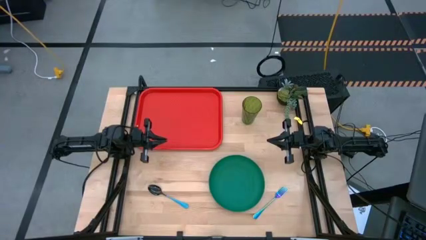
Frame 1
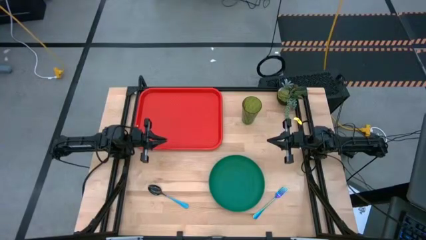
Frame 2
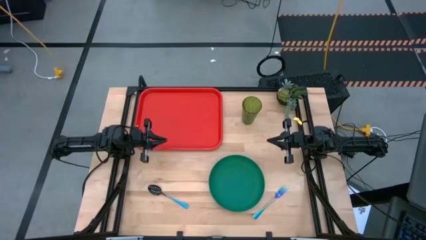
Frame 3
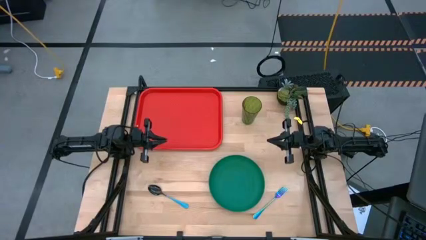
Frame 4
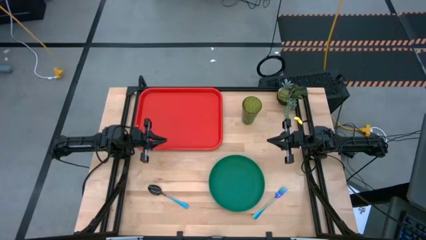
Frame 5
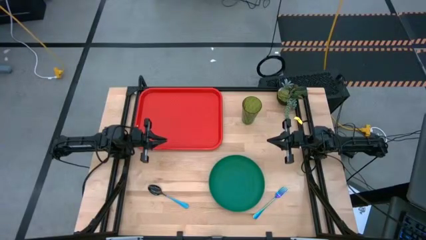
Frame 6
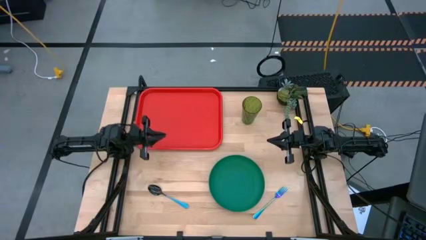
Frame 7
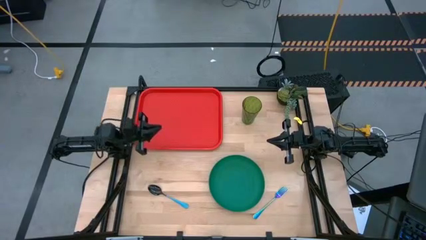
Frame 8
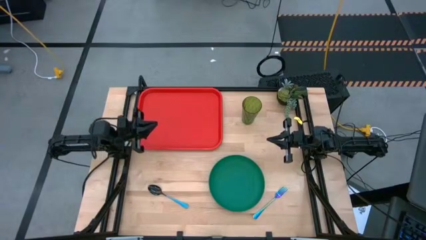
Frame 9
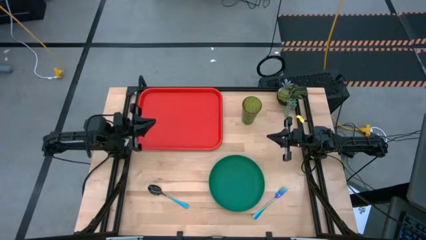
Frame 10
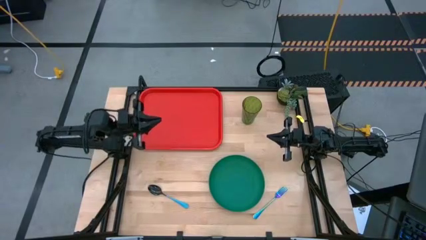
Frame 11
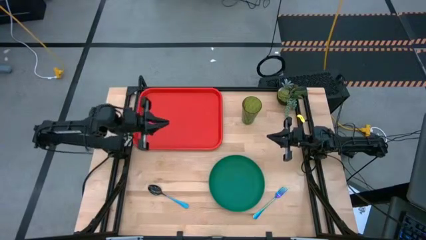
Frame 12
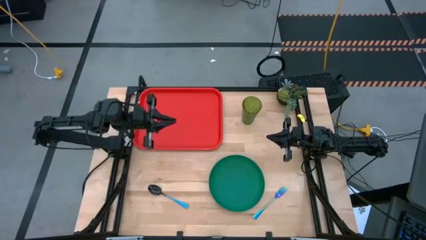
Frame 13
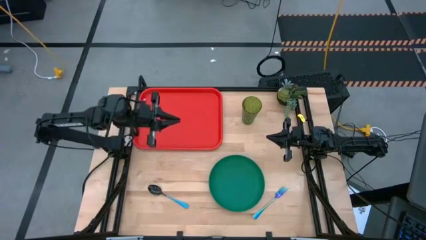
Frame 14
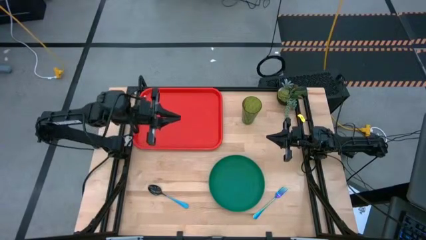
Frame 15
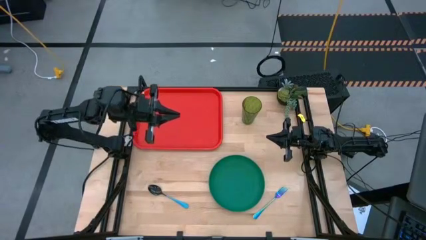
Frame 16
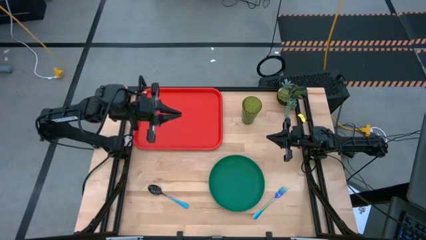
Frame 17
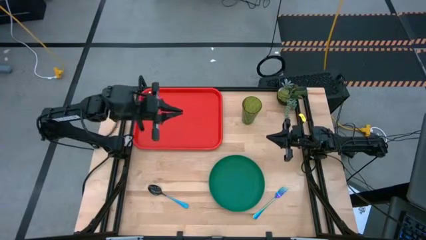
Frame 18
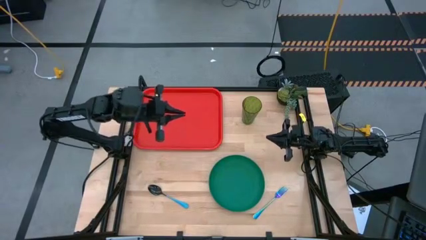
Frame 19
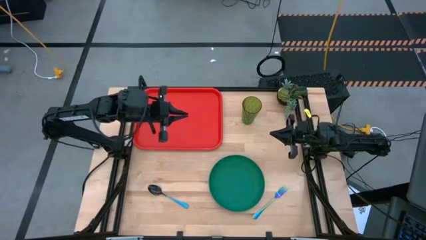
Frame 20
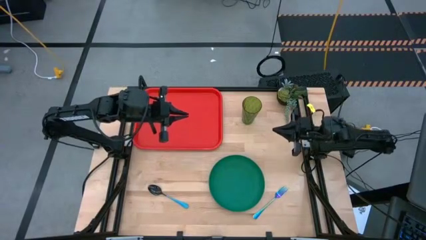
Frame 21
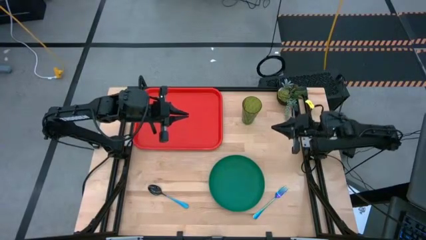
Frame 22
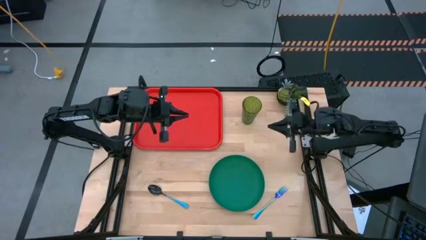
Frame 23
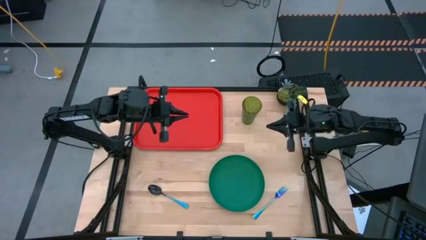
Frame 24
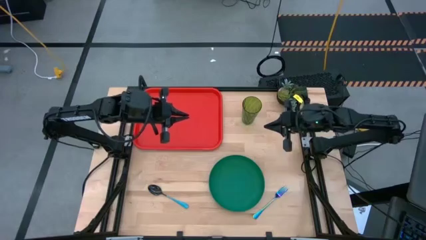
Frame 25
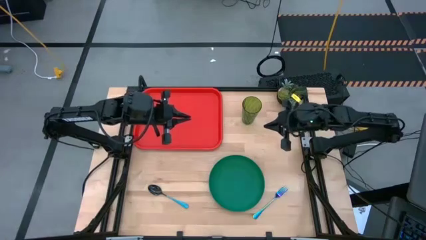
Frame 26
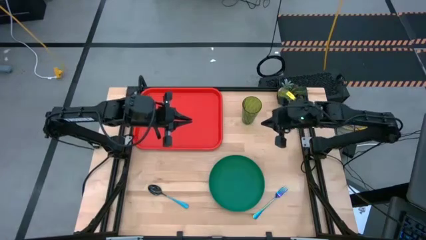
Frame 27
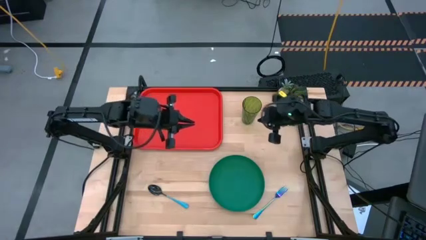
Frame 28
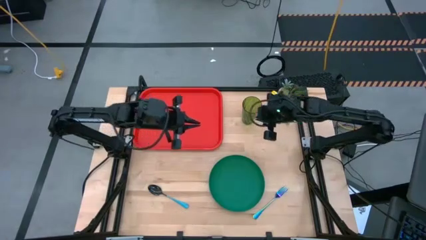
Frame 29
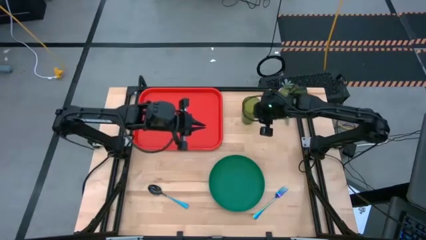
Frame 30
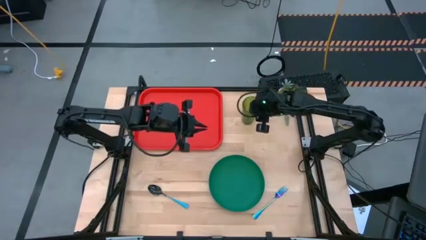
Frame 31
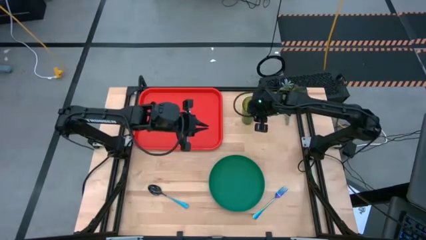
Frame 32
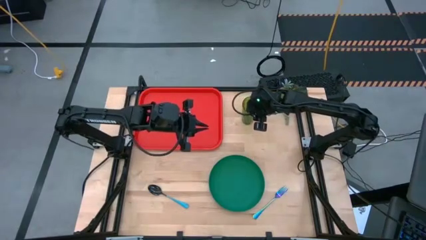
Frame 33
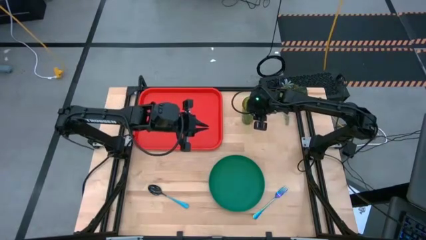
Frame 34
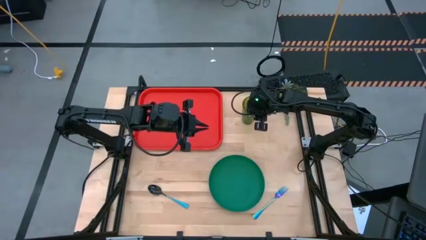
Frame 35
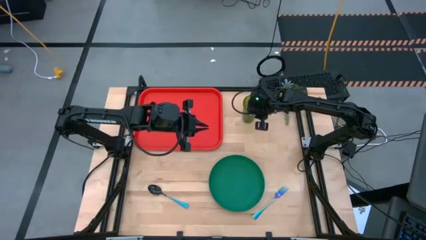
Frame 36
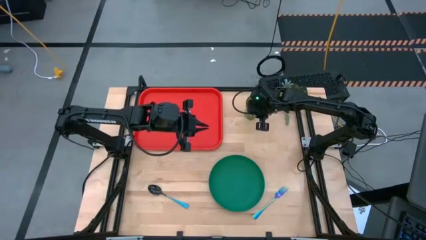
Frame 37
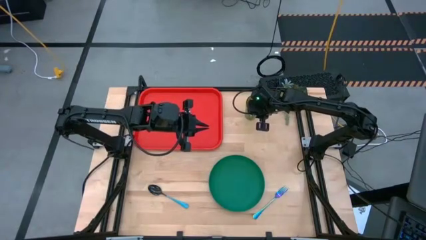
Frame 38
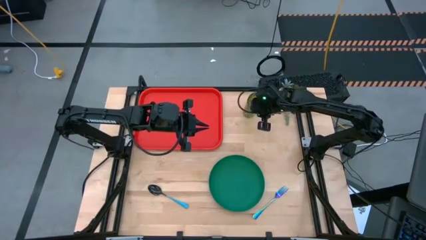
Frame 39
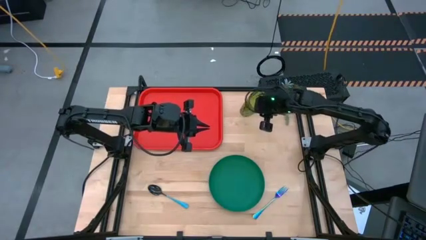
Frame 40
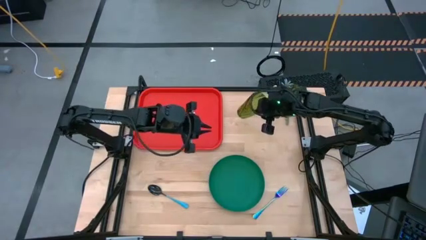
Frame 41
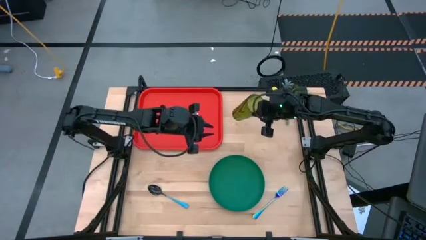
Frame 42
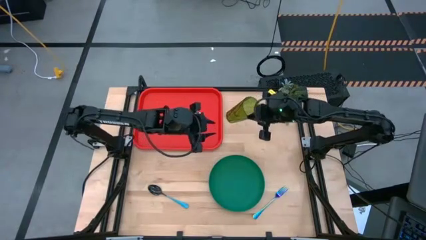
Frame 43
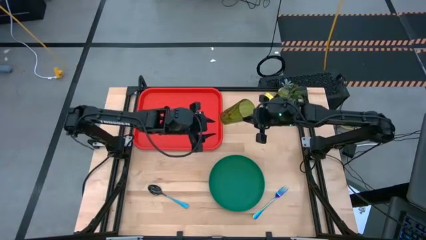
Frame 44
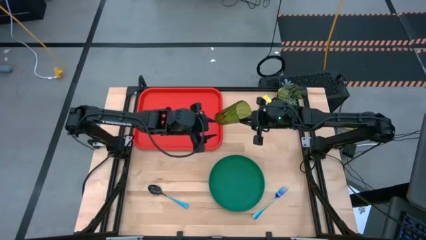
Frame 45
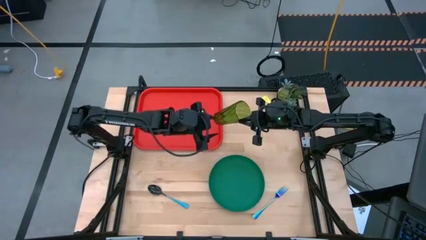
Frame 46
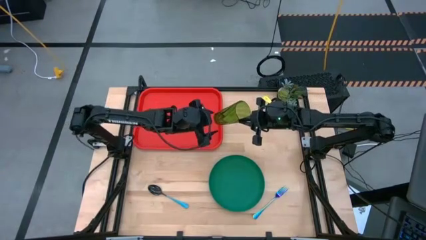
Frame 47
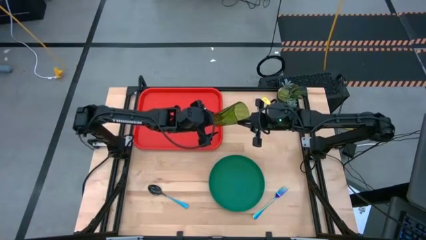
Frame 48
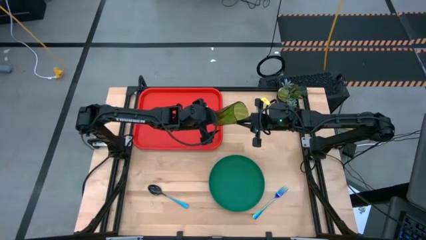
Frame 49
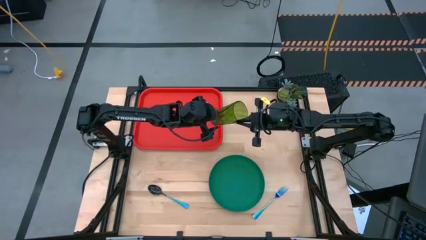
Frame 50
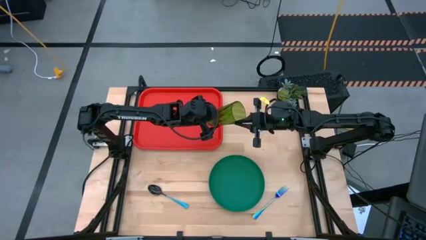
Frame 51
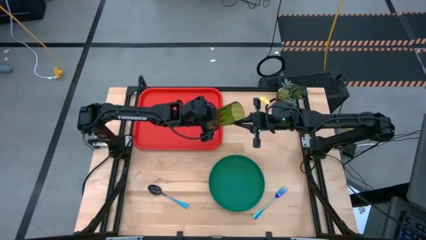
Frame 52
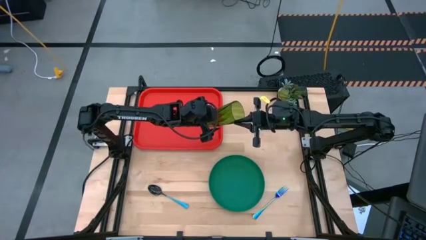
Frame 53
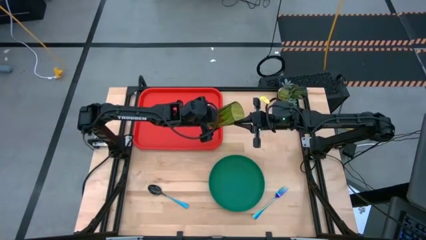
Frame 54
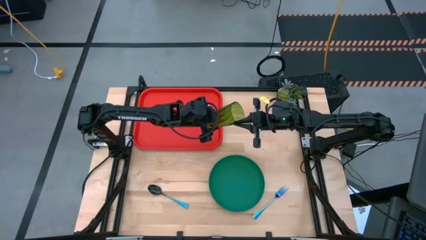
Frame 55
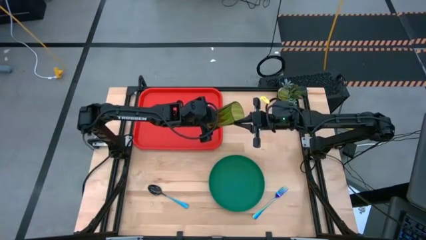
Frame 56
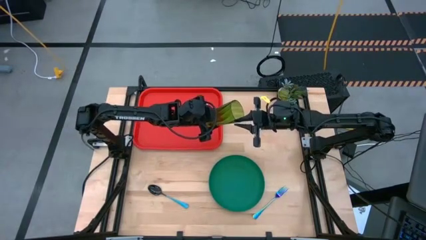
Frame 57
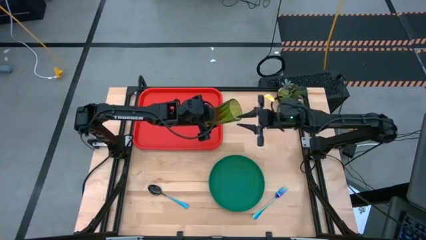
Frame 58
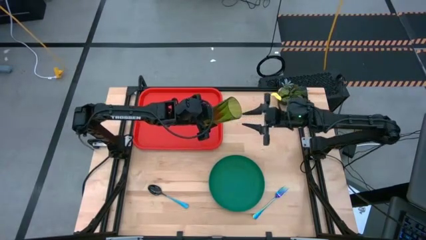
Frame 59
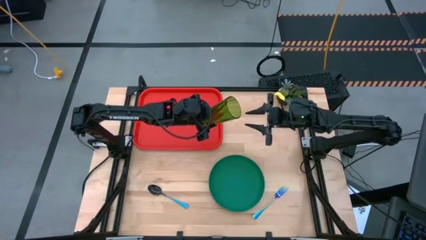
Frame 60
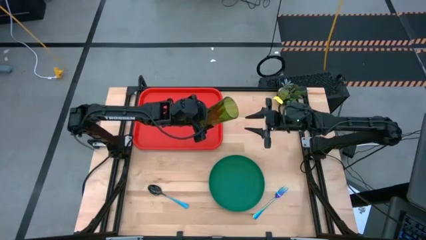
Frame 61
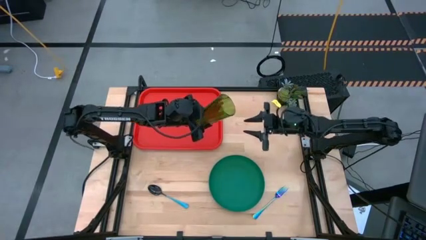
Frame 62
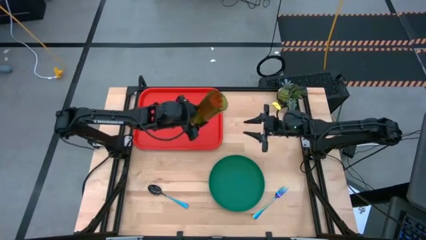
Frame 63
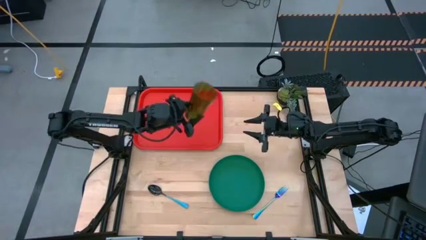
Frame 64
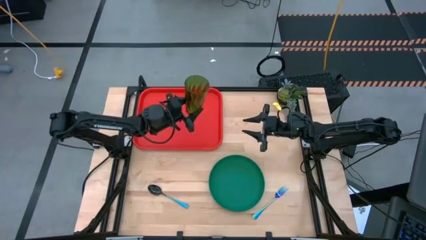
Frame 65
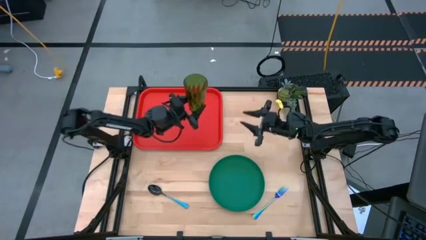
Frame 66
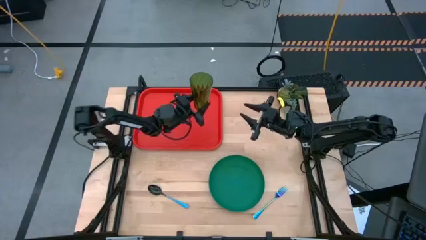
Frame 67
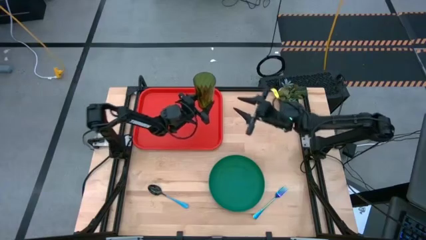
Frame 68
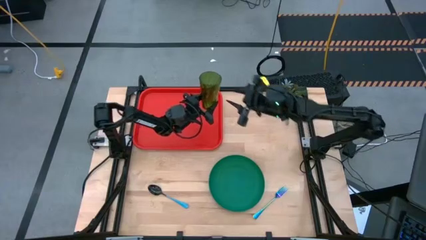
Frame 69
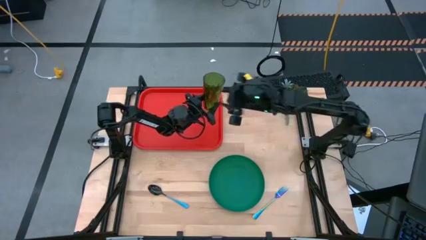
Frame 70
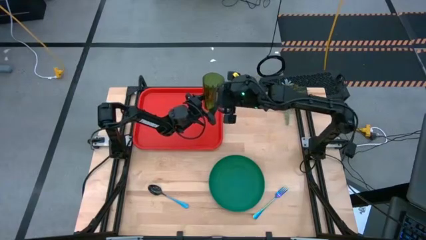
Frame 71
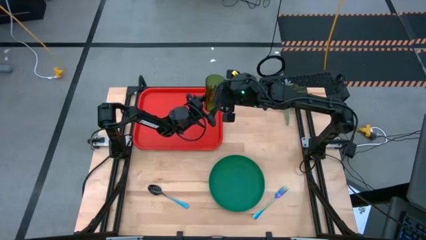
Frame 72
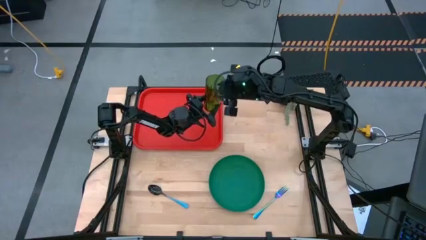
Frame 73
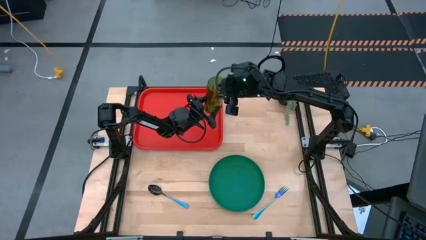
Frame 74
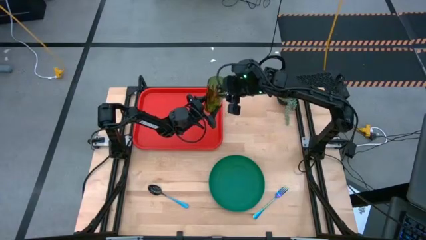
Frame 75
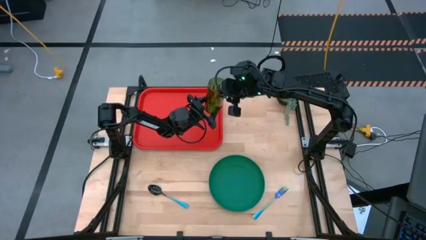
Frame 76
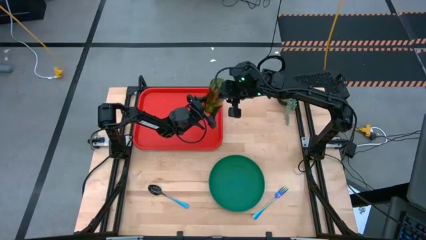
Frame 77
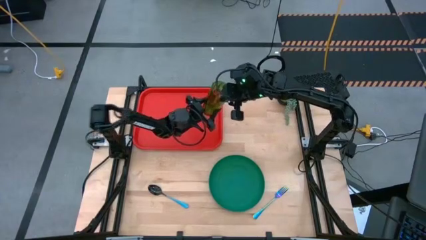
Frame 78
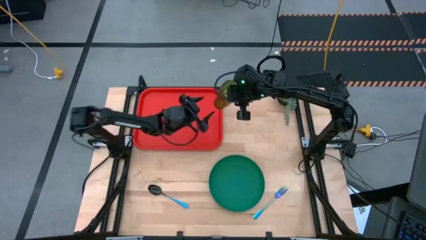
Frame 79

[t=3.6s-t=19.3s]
Task: Pick and place plate/cup/fork/spoon on tray
Put the green cup on the top left of the red tray
